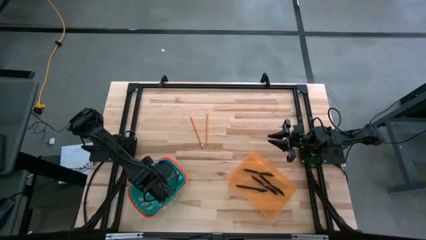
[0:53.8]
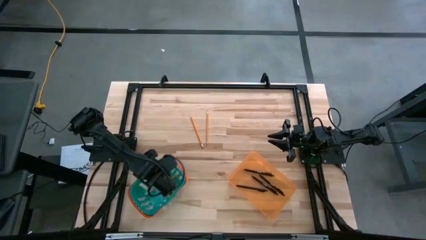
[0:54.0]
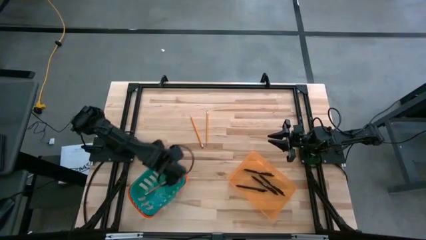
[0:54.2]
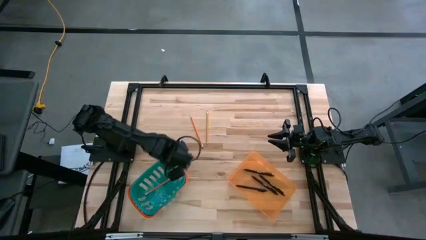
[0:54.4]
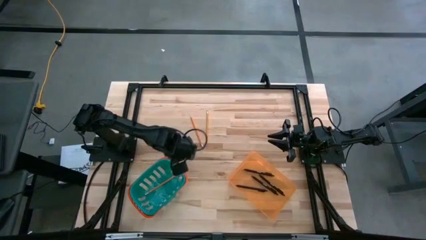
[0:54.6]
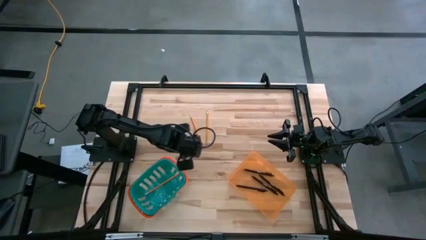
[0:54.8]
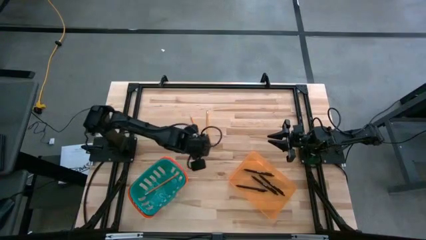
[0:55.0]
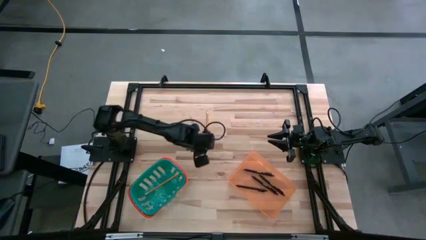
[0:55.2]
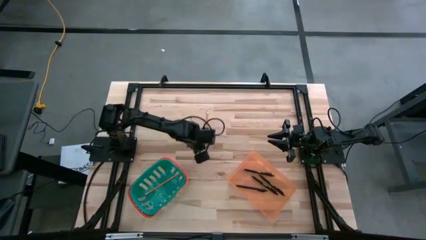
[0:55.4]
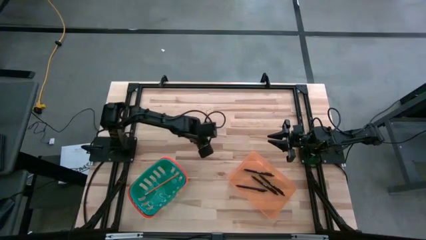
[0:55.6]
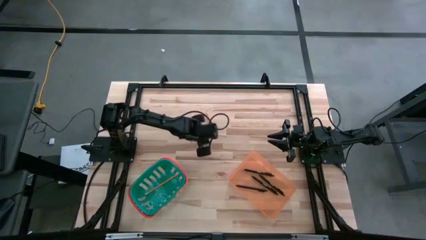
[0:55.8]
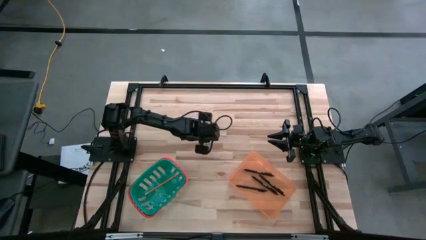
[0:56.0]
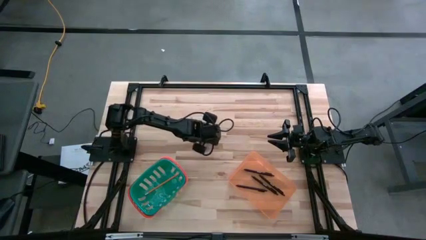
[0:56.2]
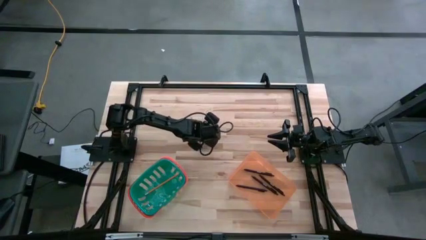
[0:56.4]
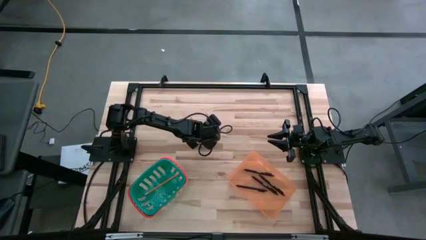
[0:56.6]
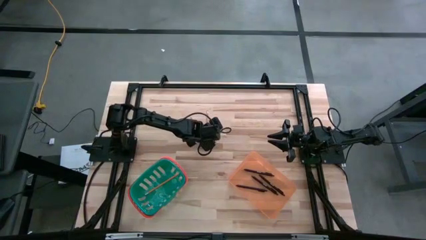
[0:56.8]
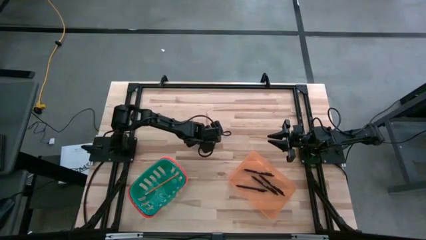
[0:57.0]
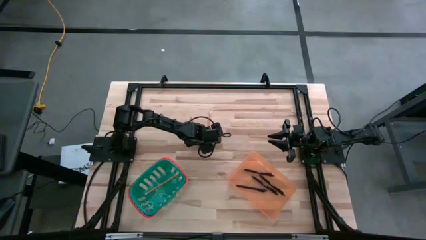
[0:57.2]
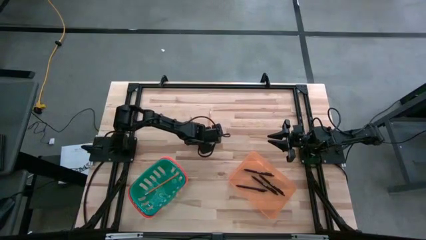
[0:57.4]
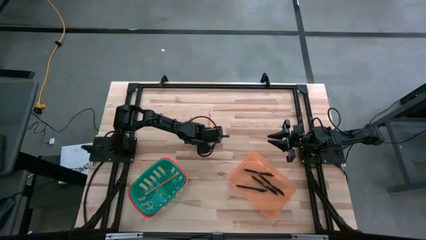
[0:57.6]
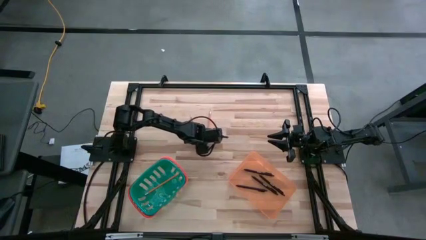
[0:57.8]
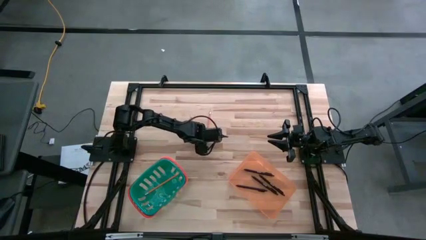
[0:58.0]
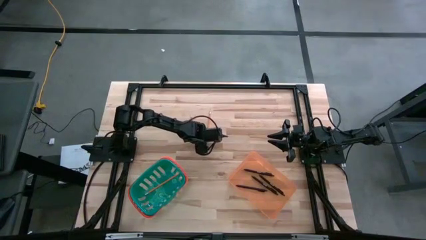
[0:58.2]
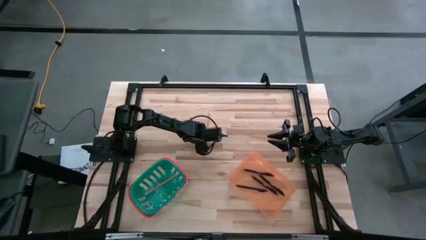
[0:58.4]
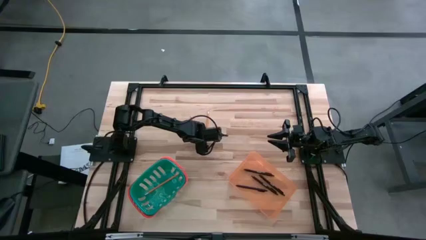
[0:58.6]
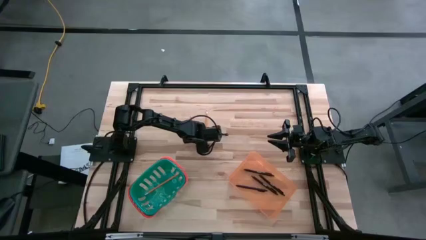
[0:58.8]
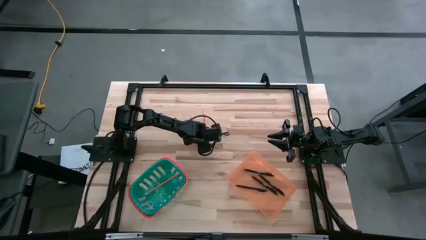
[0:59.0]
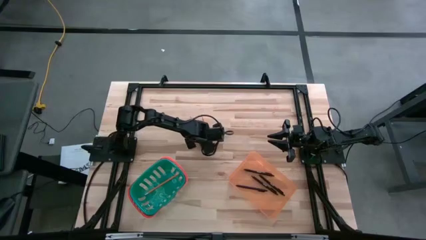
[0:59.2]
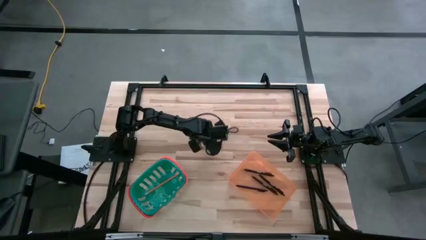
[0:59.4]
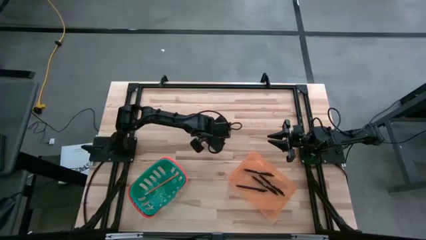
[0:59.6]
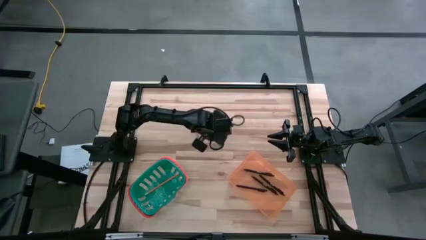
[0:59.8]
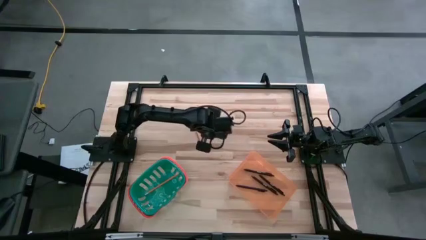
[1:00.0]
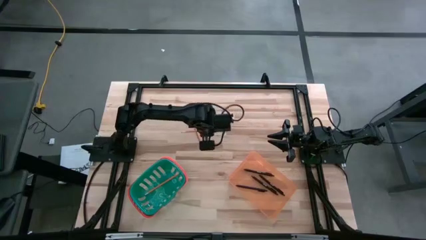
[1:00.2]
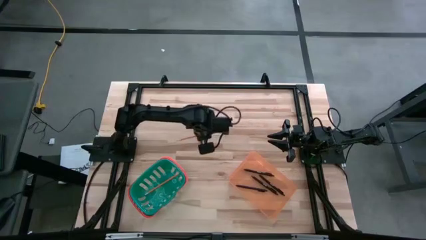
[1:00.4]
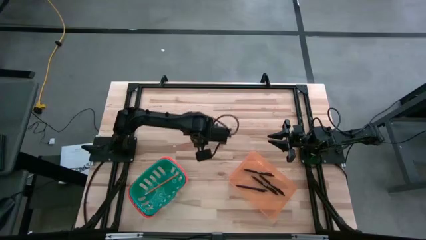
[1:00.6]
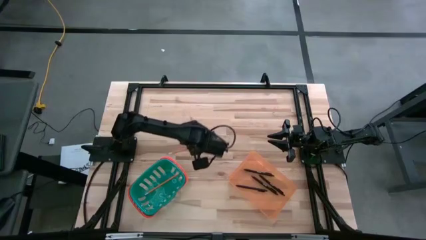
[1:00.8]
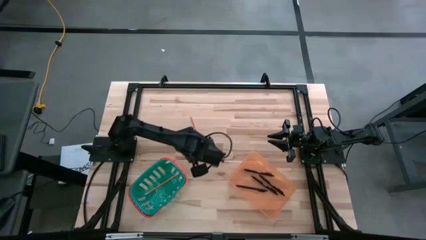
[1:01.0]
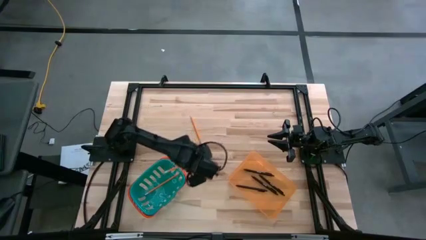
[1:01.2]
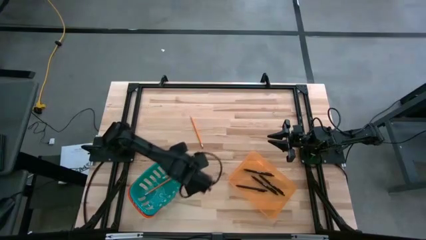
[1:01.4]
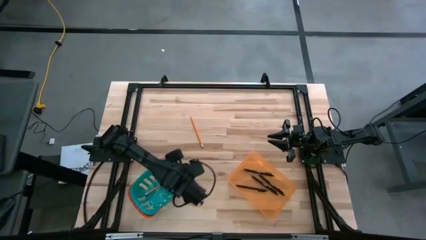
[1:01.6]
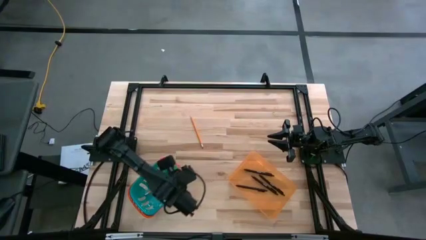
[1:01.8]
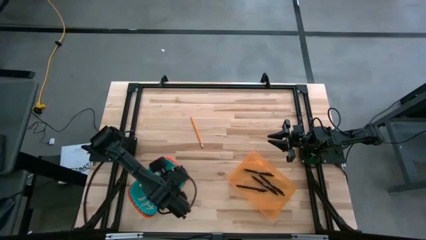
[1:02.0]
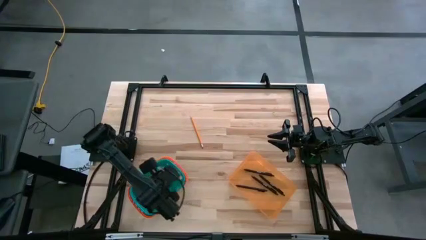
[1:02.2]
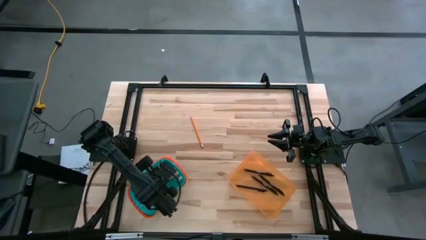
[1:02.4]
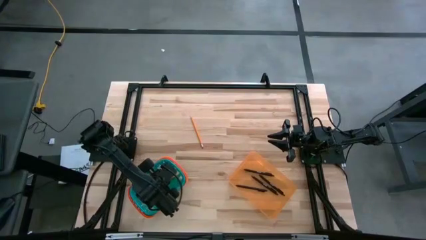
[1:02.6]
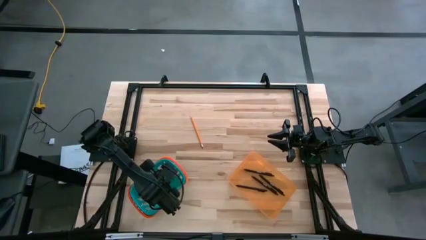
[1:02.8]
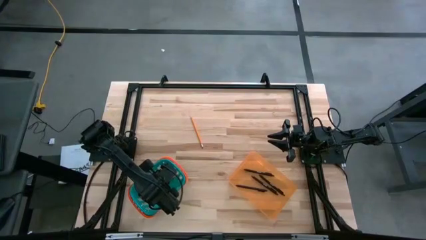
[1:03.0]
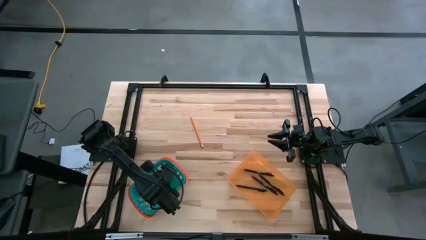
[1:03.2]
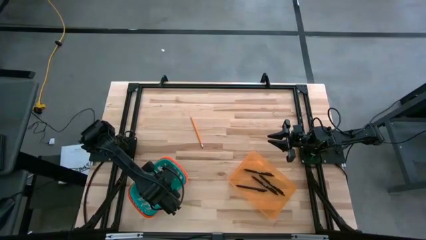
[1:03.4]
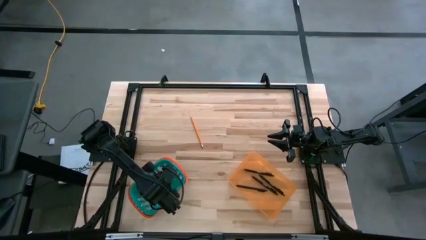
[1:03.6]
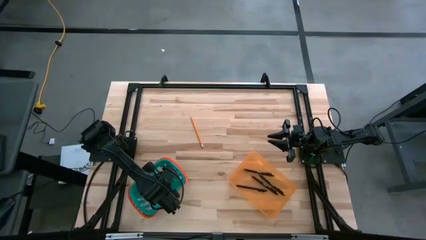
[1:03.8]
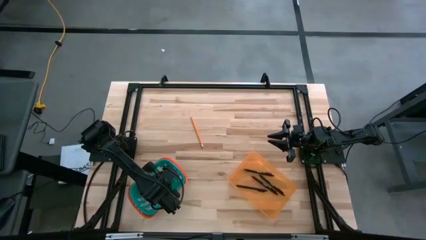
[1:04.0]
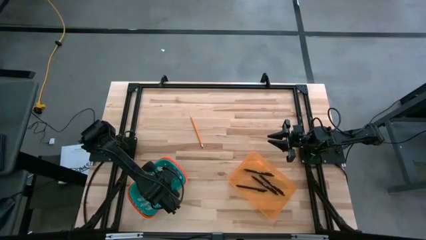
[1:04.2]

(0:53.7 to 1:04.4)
Task: Sort pens & pencils
Put the right yellow pencil into the blue bin

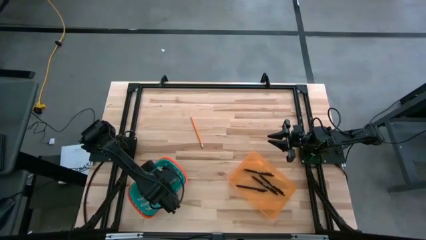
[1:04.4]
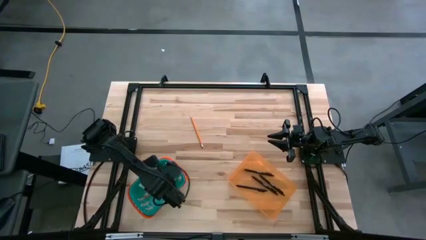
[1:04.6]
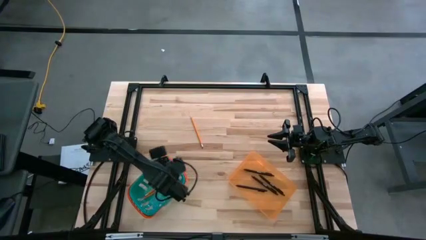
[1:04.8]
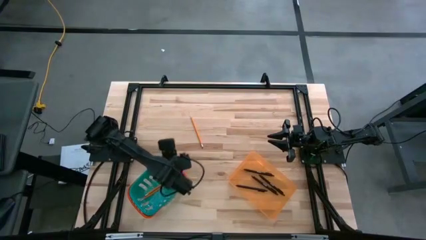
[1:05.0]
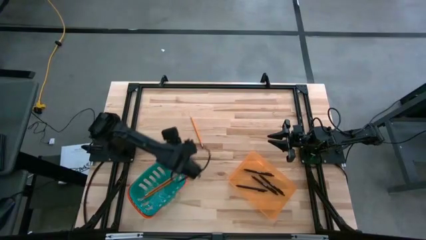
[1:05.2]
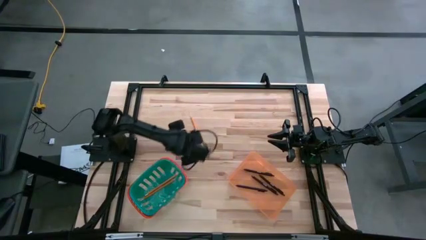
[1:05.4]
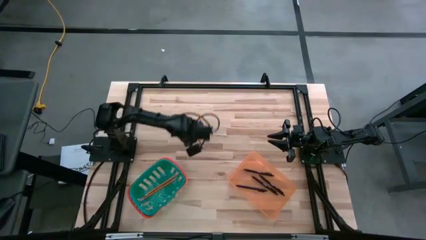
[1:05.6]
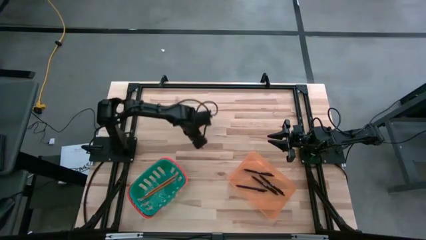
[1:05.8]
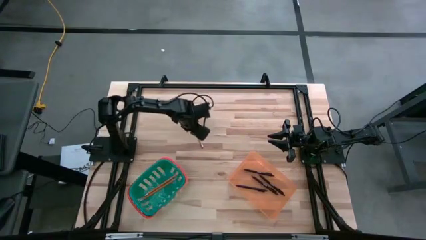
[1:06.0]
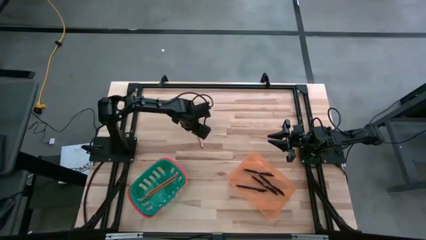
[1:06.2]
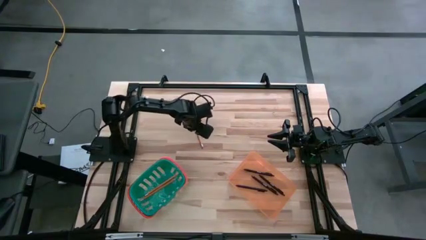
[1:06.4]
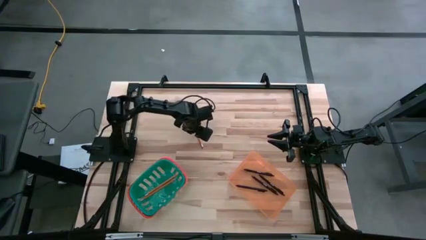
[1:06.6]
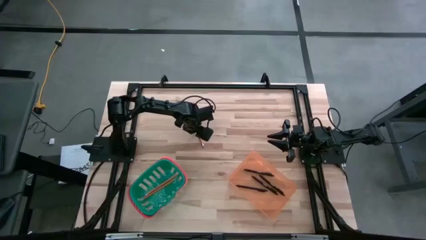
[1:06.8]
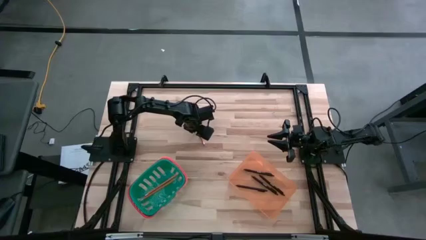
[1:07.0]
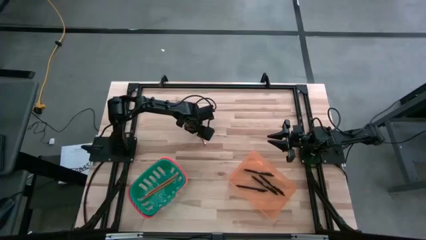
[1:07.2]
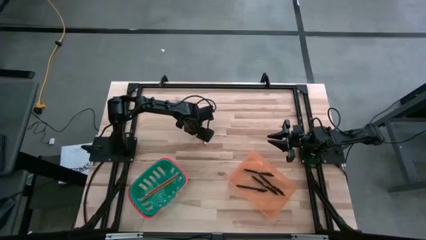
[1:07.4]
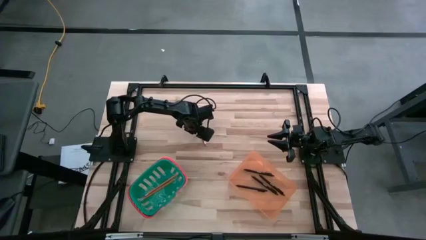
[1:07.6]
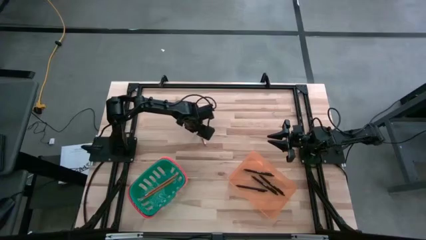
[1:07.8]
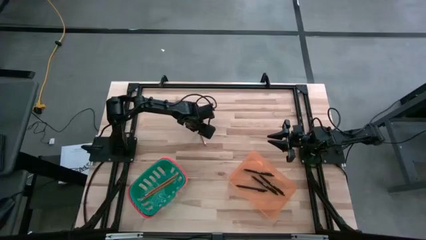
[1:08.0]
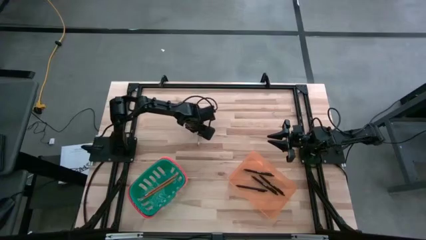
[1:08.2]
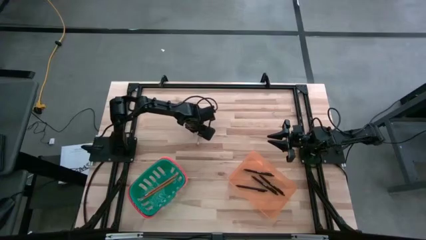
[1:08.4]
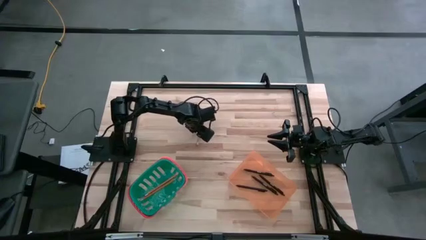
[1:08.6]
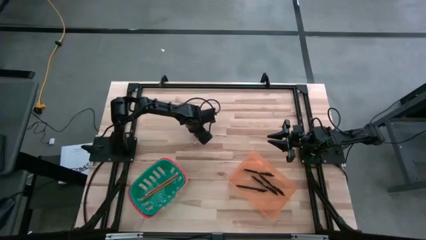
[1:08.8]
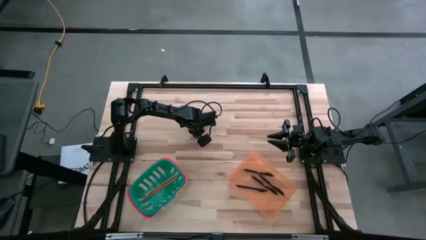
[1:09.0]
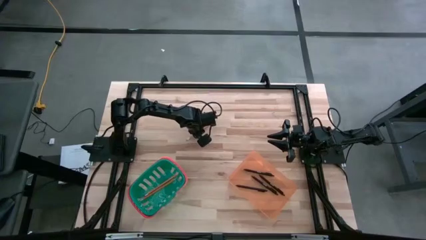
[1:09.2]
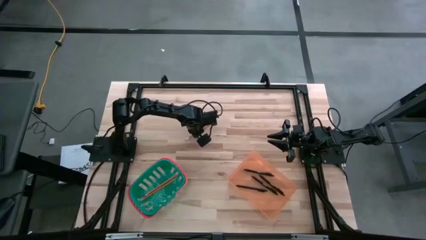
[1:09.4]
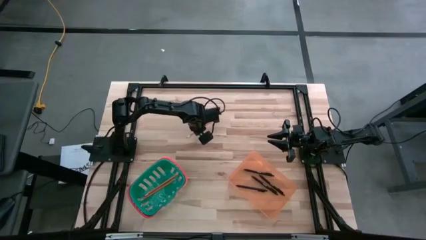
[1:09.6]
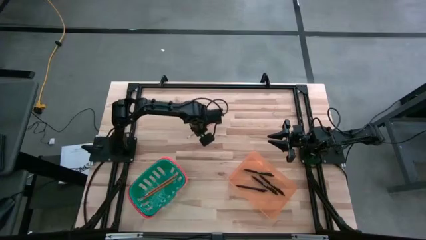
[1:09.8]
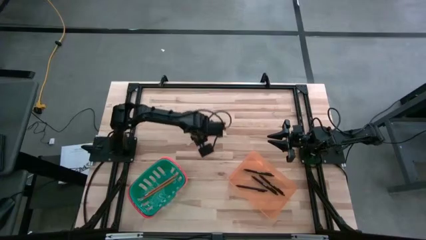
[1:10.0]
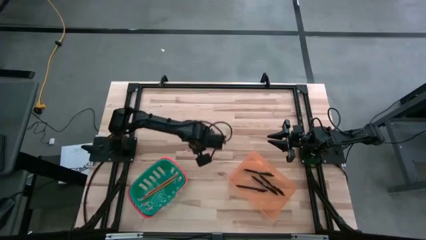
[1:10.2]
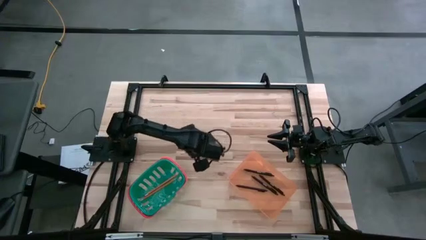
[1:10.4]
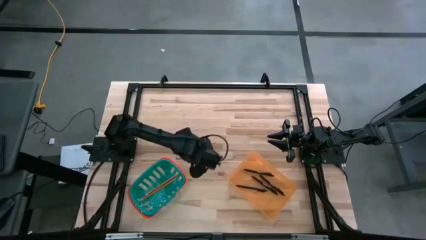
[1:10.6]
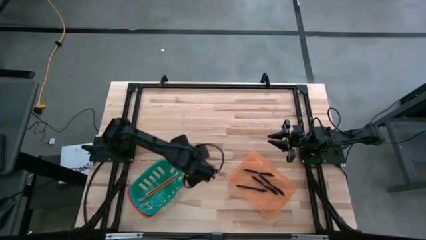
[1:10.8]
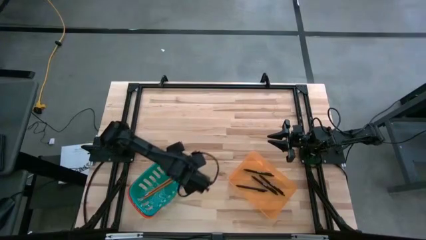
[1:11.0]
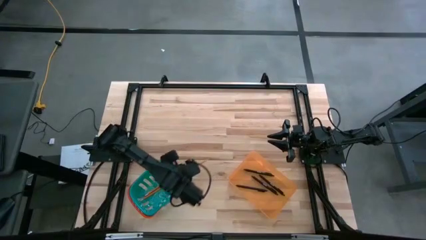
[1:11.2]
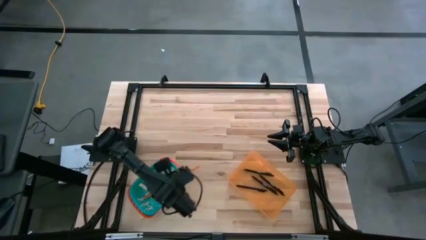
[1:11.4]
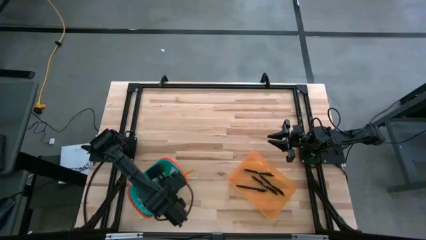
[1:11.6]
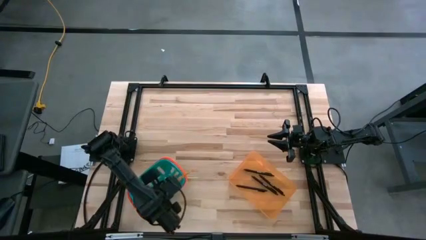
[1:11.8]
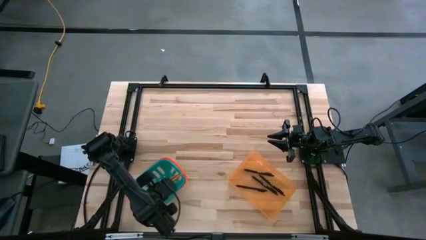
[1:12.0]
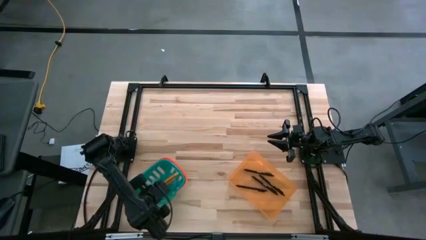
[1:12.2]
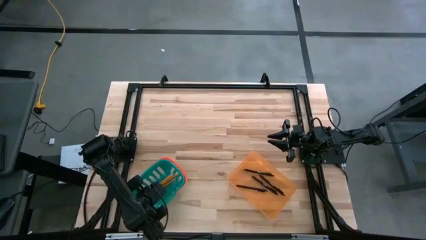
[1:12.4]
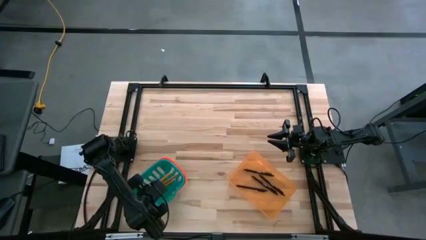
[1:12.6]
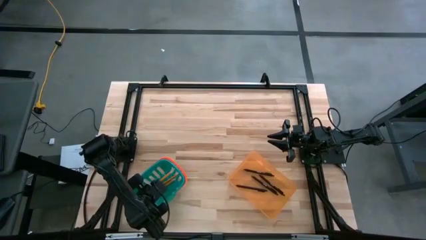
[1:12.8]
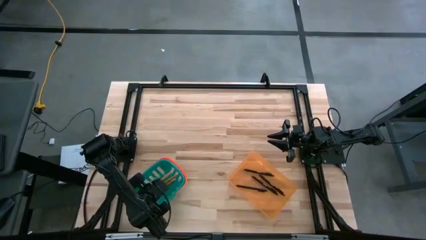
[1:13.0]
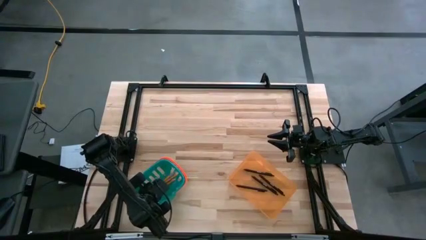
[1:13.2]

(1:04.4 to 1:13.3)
Put the yellow pencil into the blue bin
